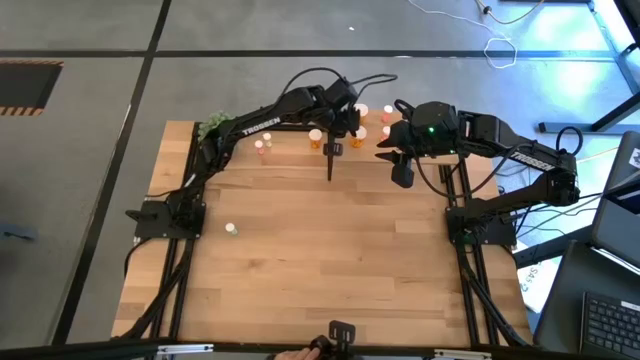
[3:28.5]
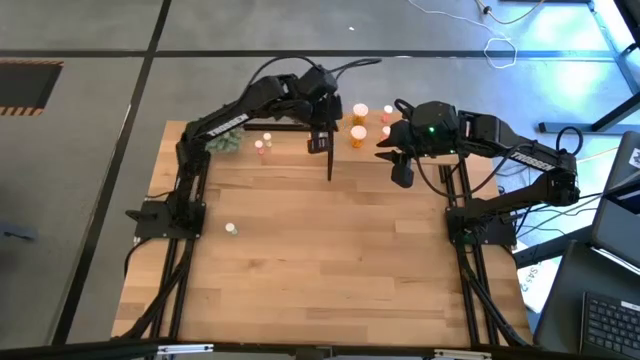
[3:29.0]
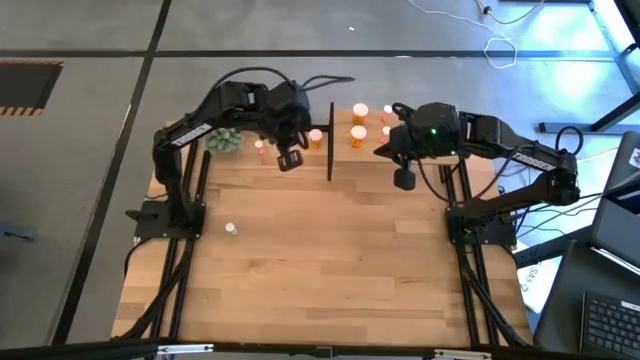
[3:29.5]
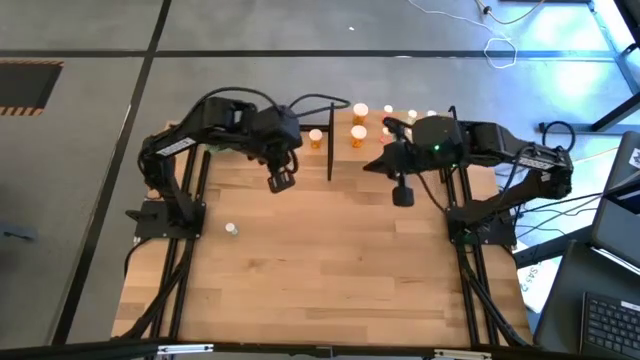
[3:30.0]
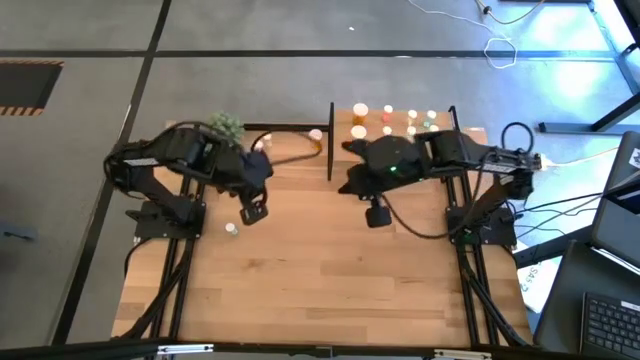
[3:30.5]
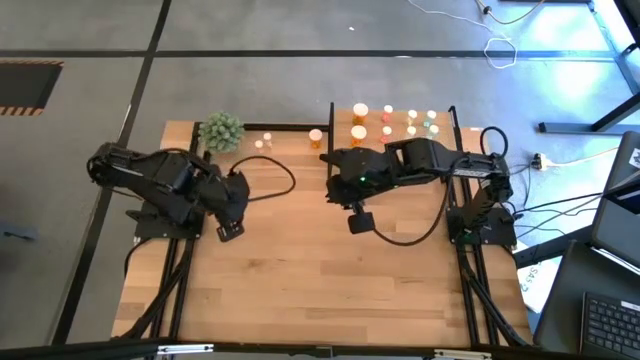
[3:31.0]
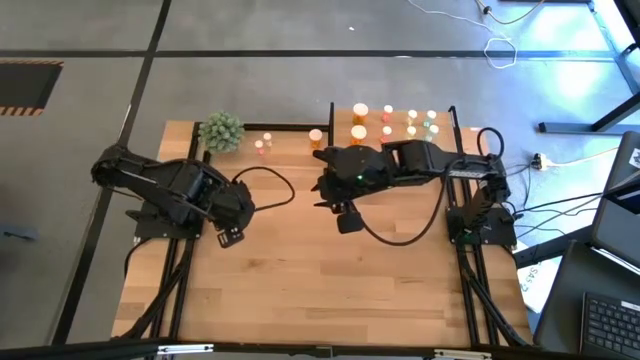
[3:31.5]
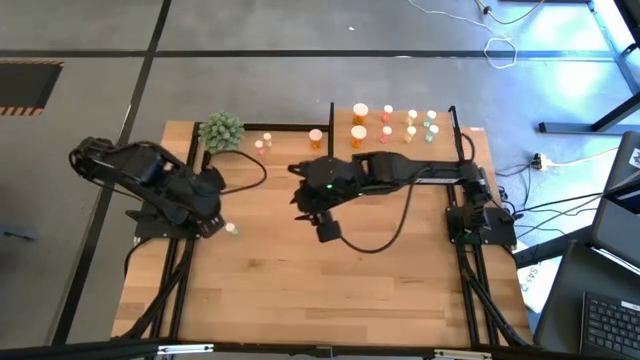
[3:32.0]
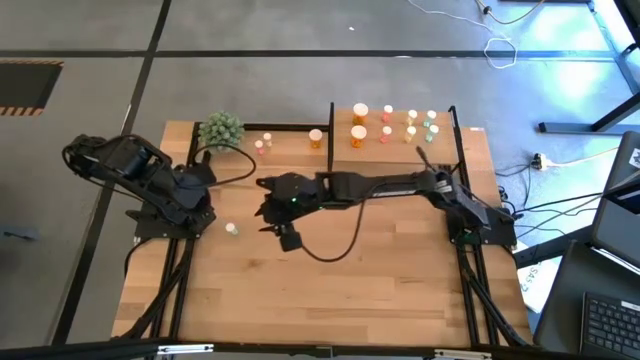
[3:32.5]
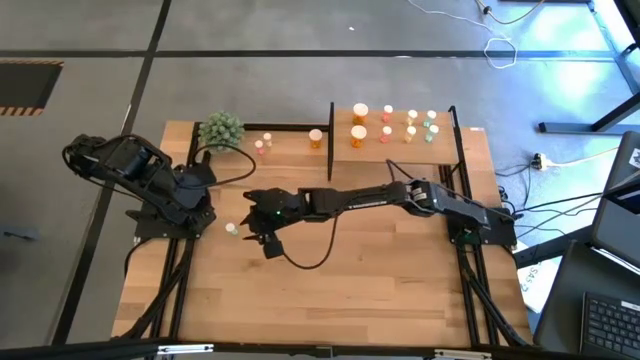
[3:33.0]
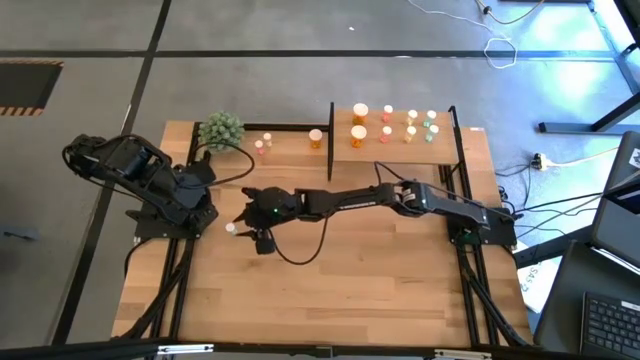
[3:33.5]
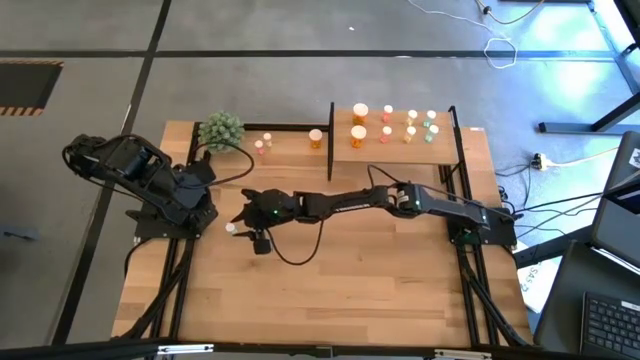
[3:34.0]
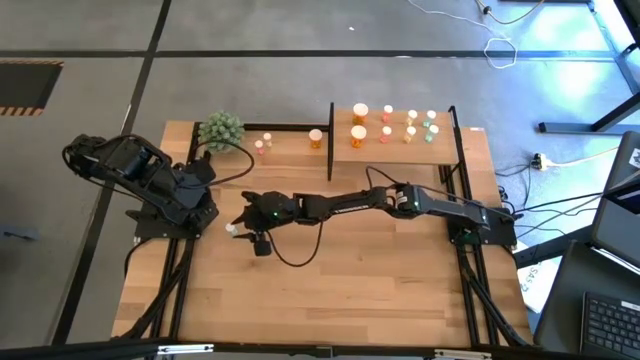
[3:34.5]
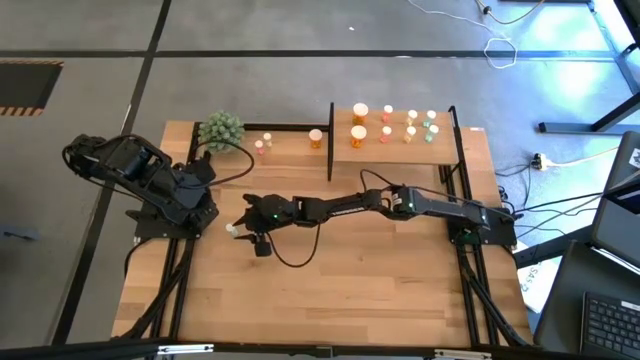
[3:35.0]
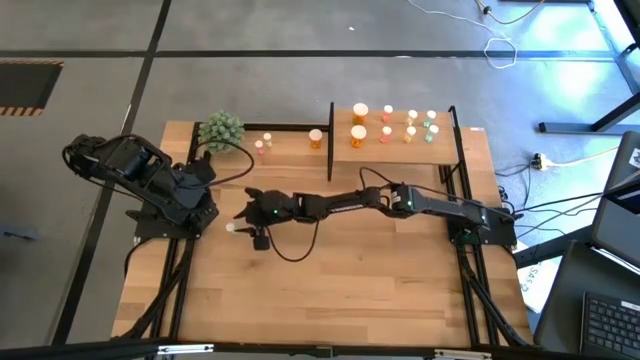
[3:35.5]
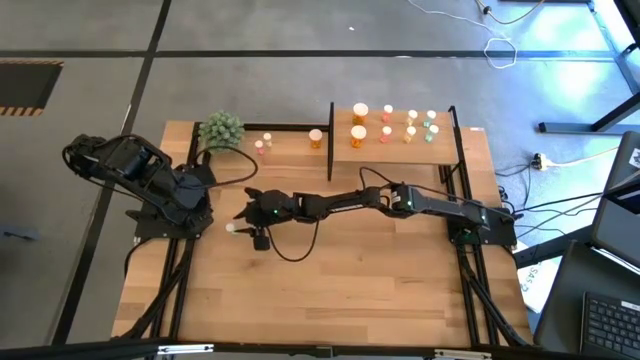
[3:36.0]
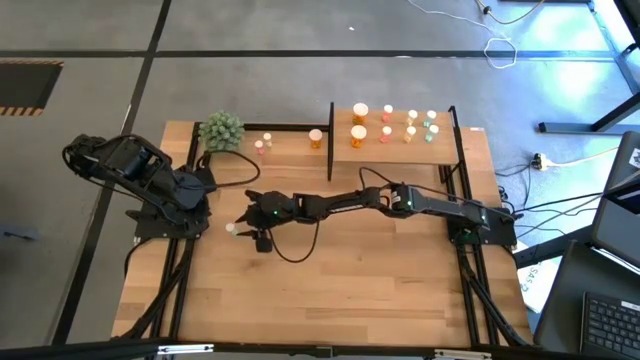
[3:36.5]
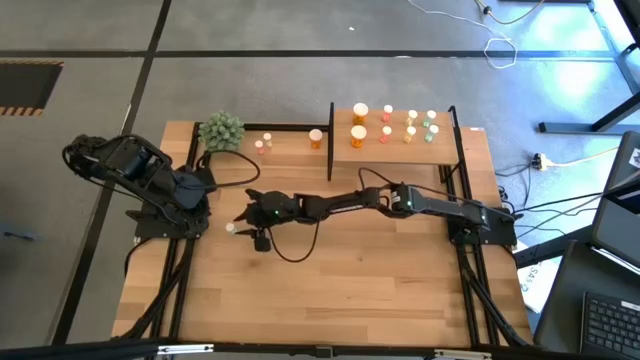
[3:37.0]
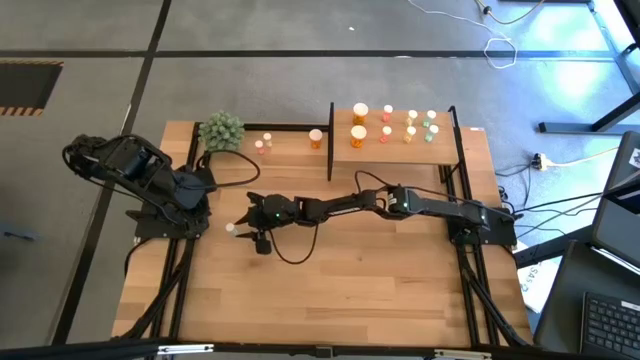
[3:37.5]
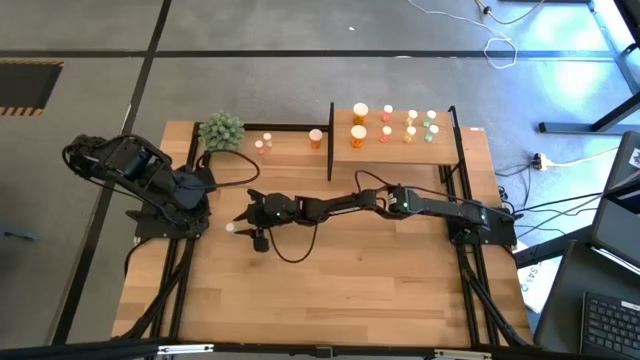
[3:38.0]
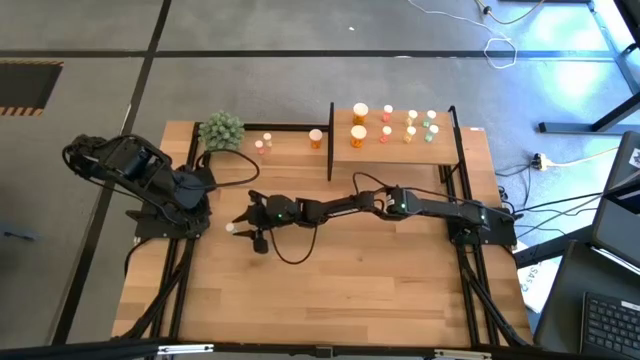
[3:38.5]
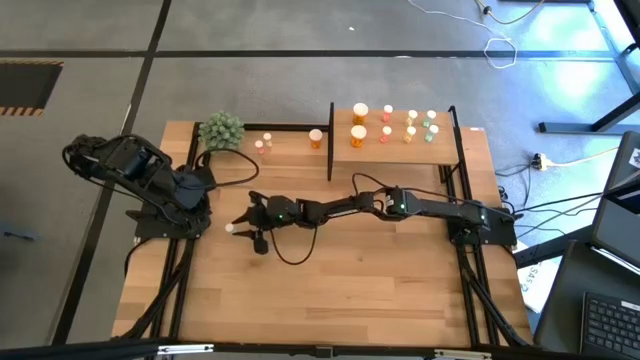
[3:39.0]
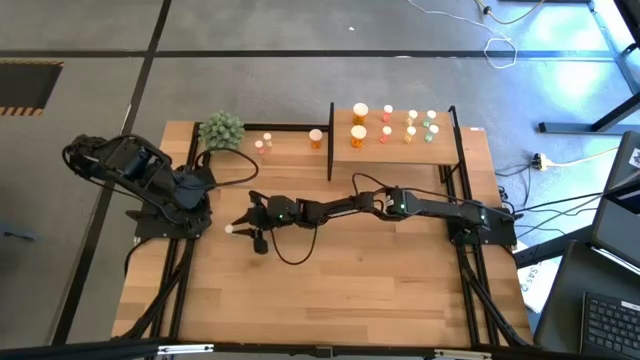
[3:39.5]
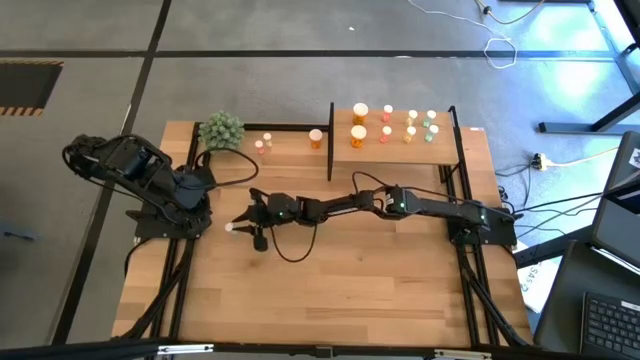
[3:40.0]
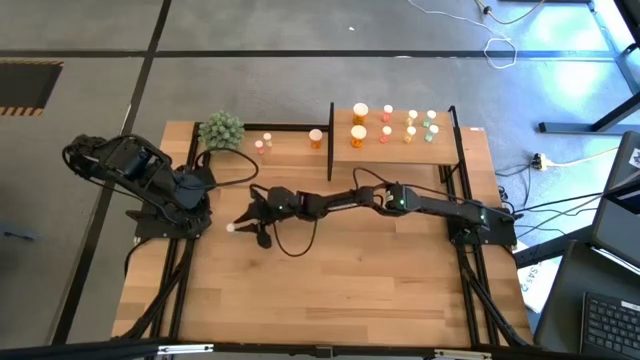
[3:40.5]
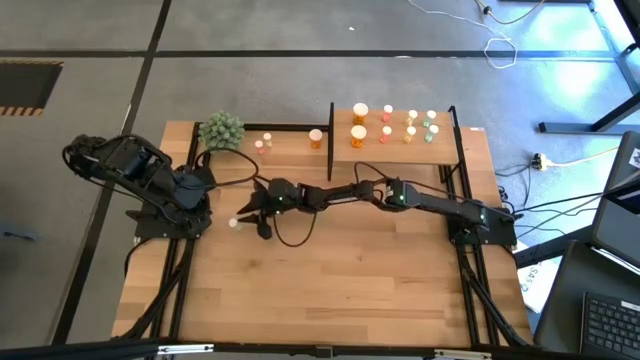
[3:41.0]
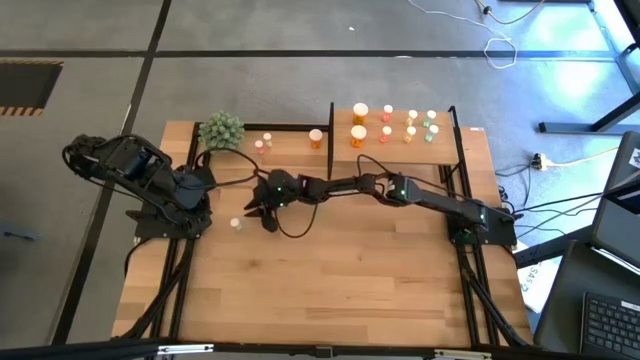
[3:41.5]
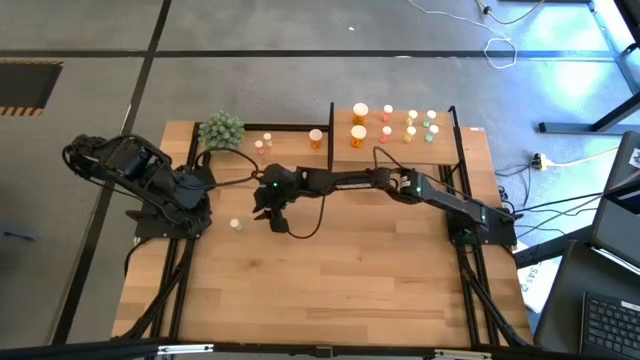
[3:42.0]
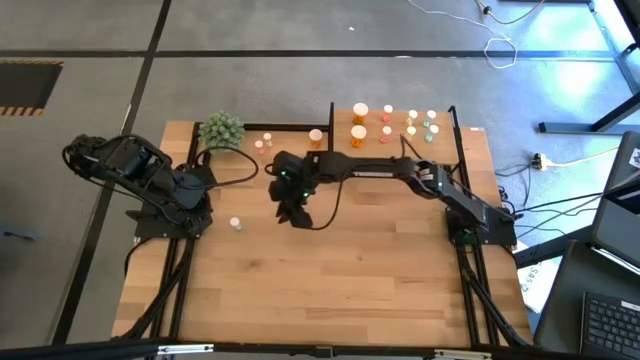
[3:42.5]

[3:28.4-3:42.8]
Task: Pick and place medicine bottles onto shelf by color
Put the blue pill bottle on the shelf aligned with the other blue pill bottles

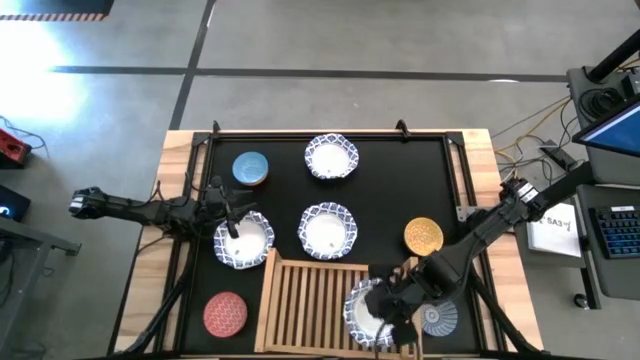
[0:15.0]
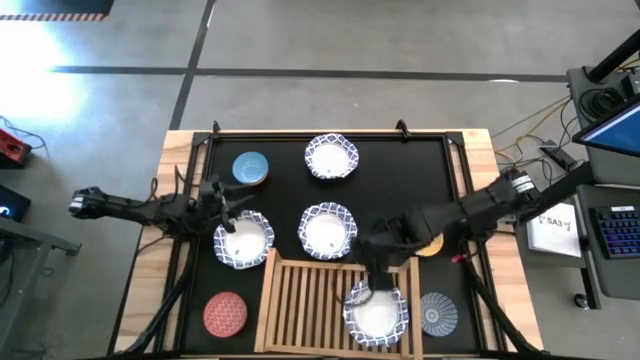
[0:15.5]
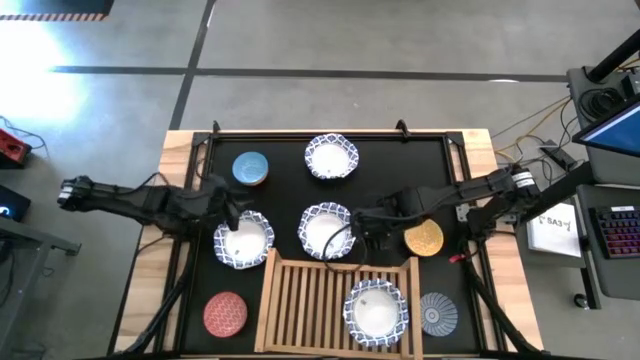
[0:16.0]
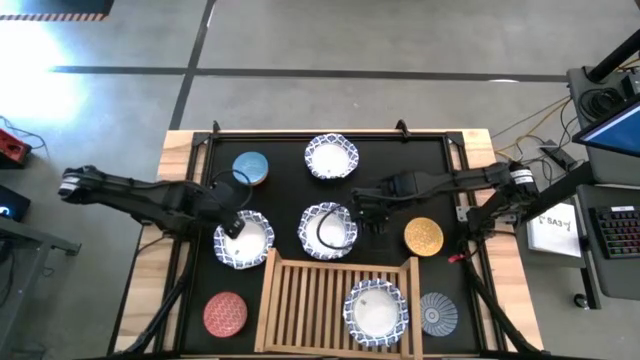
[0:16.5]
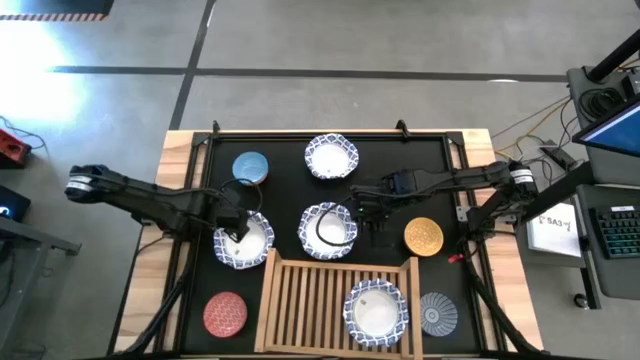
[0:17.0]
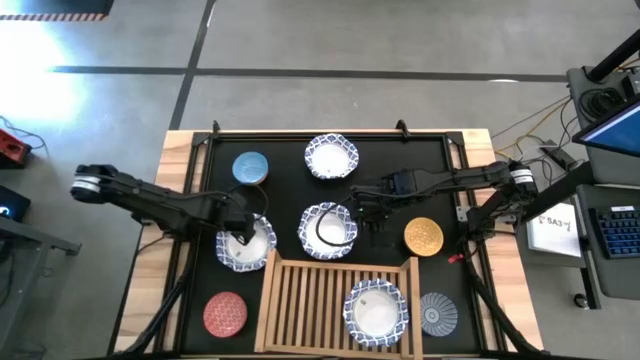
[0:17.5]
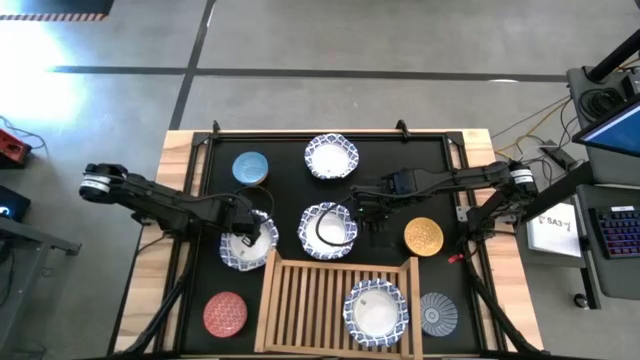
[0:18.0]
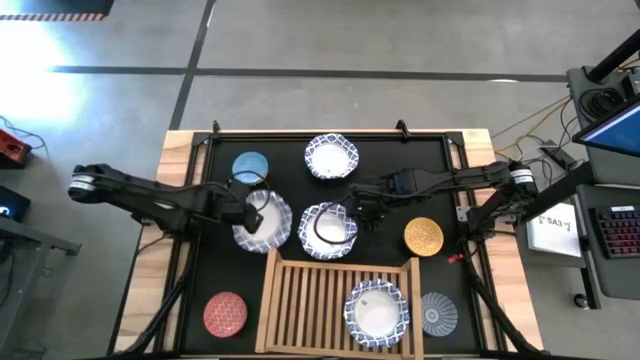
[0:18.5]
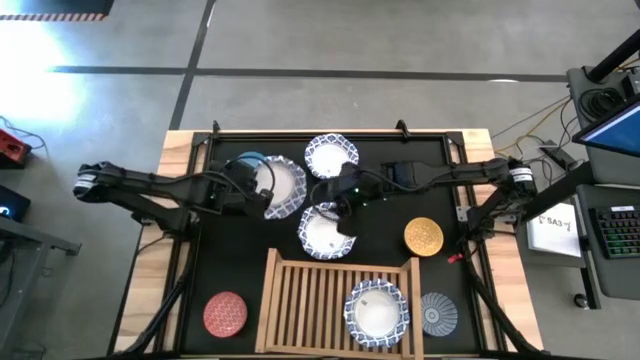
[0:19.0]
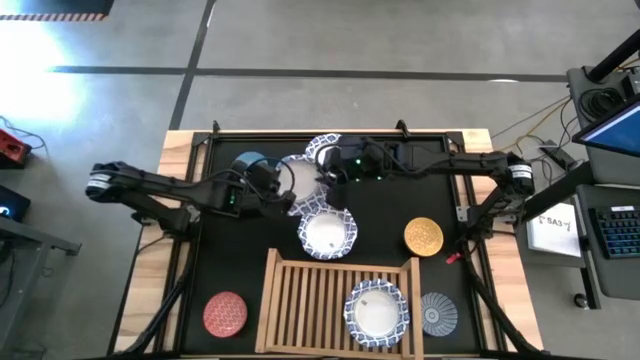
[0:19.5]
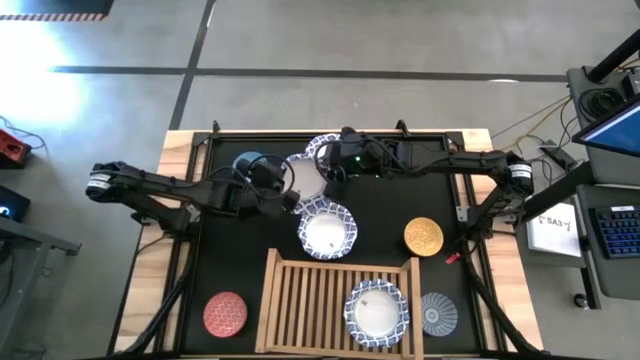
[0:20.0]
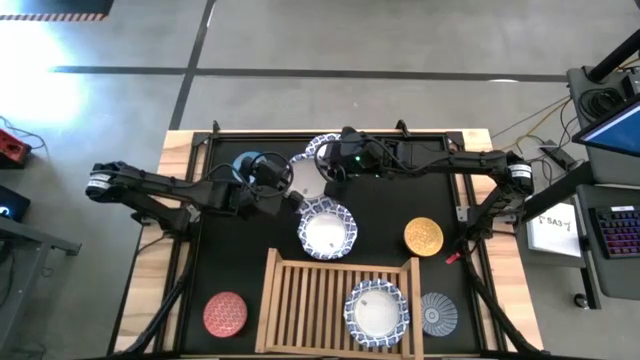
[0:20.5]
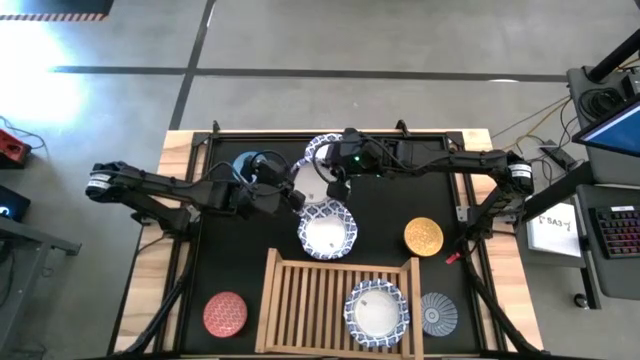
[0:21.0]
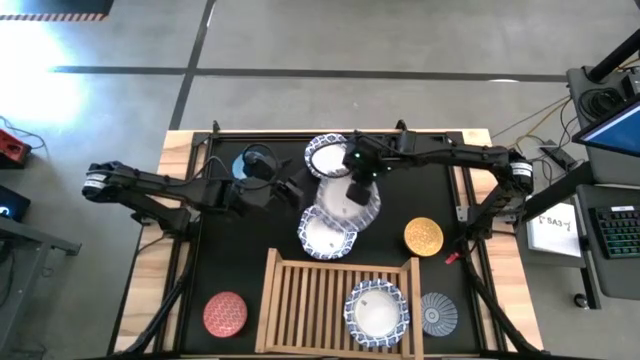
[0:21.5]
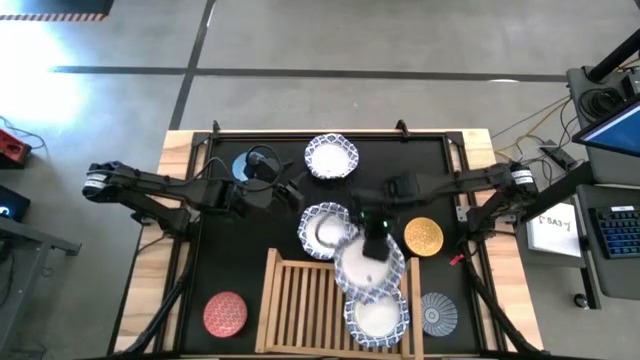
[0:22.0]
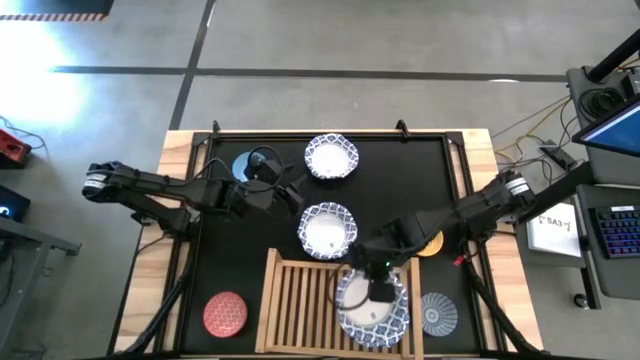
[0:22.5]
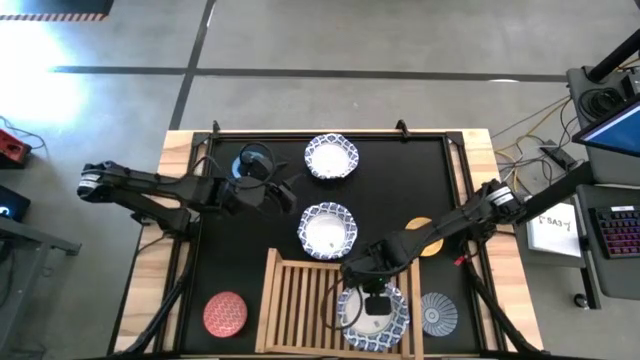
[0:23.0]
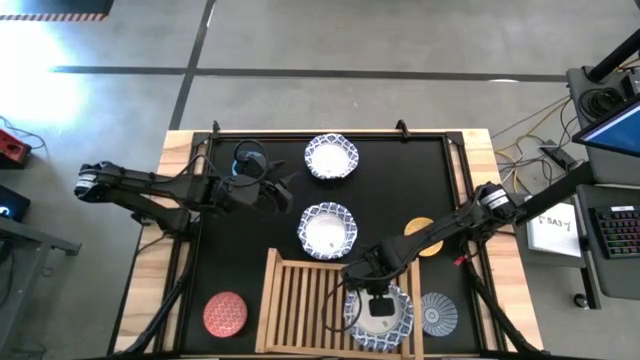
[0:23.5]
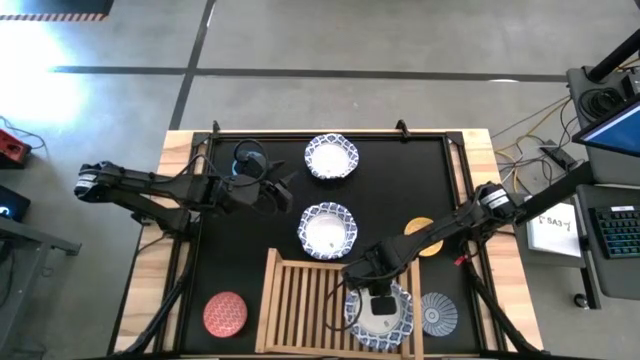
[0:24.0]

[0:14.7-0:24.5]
Task: Place and stack bowls onto a shelf
Stack the white patterned bowl on top of the white patterned bowl on the shelf
